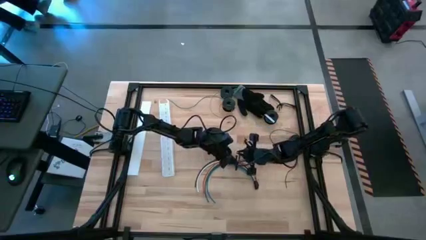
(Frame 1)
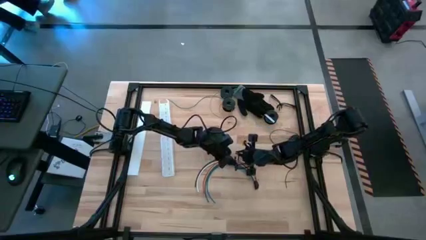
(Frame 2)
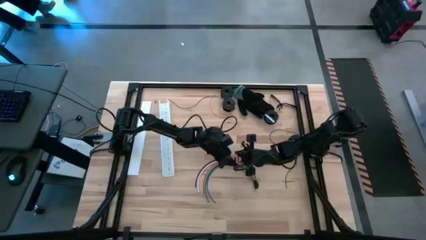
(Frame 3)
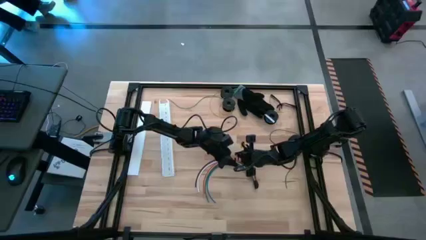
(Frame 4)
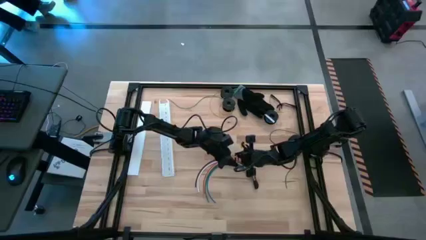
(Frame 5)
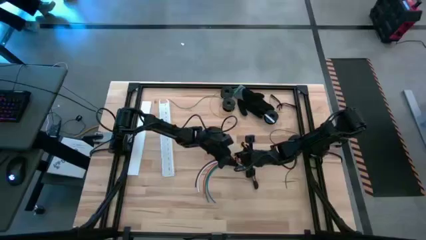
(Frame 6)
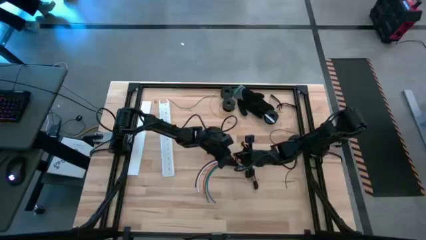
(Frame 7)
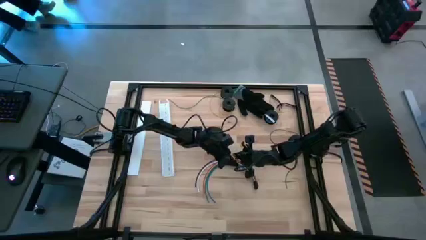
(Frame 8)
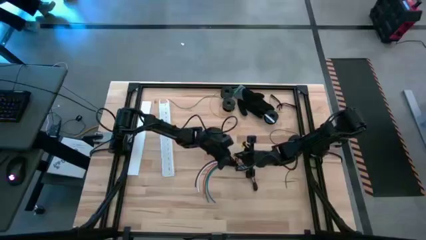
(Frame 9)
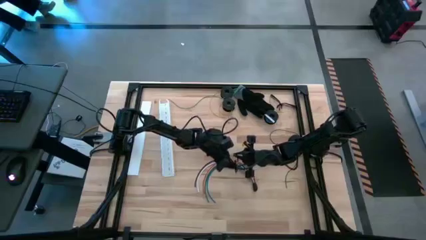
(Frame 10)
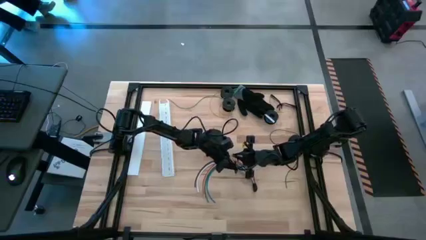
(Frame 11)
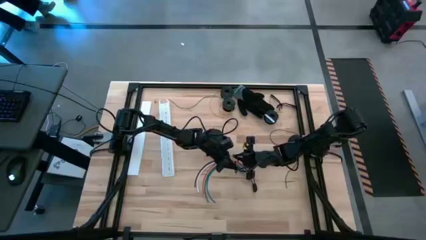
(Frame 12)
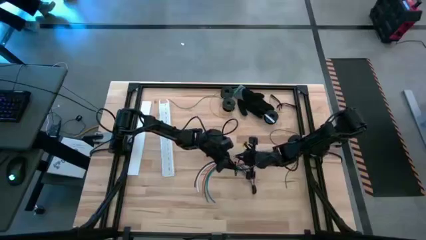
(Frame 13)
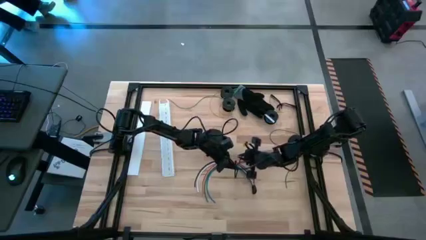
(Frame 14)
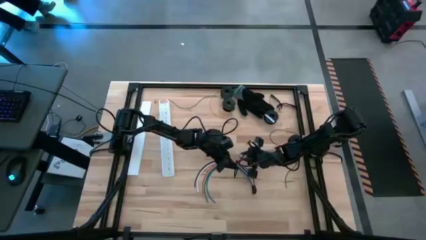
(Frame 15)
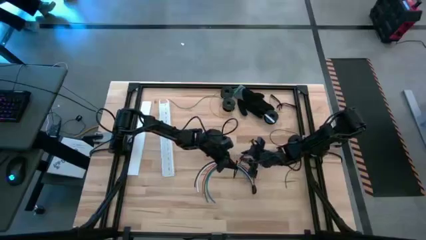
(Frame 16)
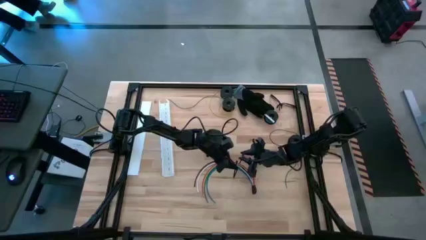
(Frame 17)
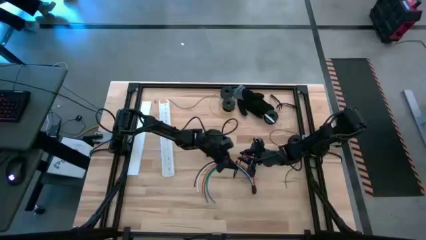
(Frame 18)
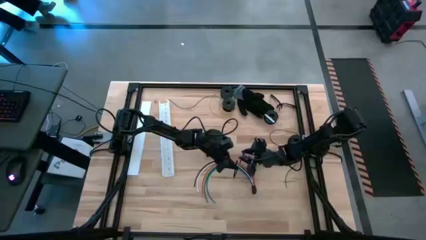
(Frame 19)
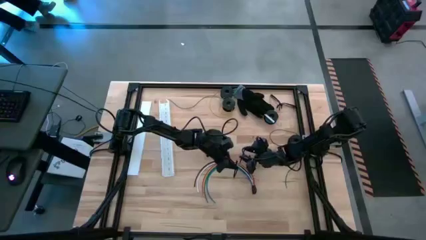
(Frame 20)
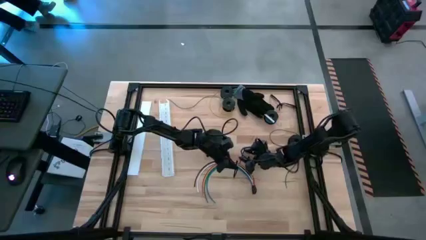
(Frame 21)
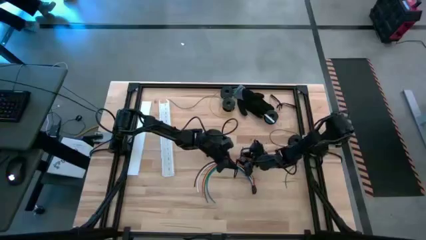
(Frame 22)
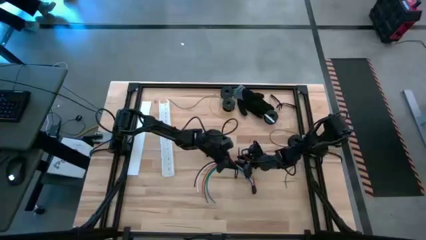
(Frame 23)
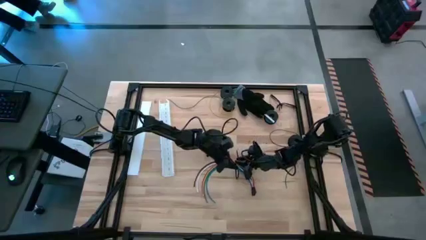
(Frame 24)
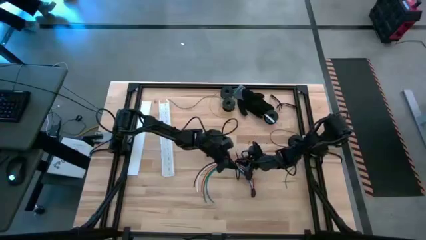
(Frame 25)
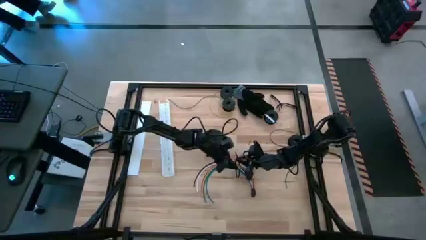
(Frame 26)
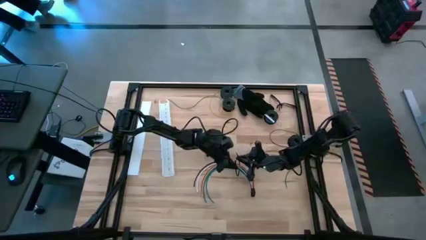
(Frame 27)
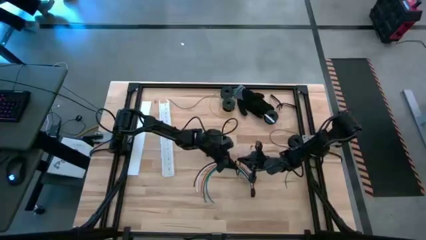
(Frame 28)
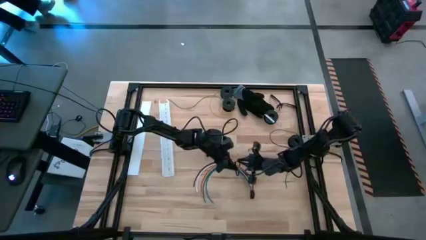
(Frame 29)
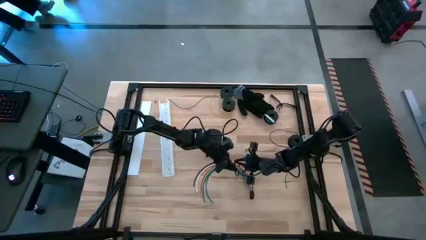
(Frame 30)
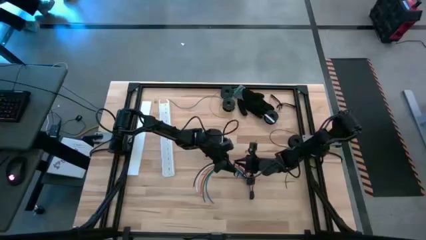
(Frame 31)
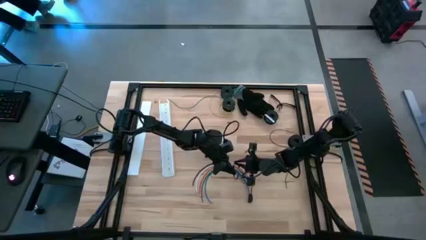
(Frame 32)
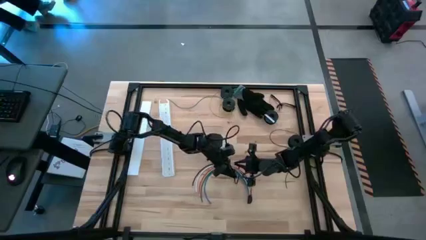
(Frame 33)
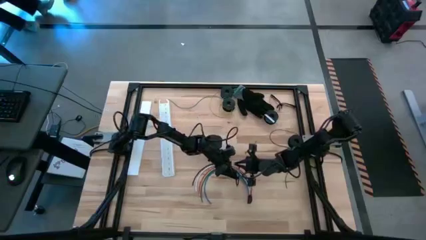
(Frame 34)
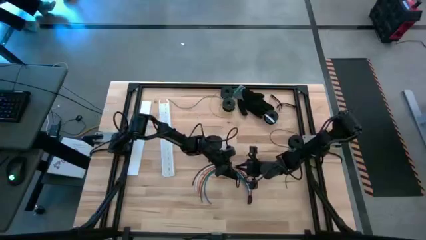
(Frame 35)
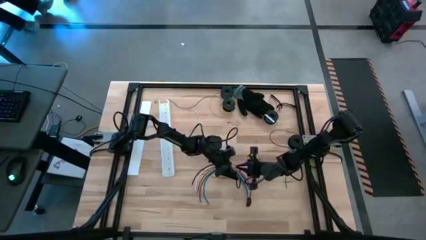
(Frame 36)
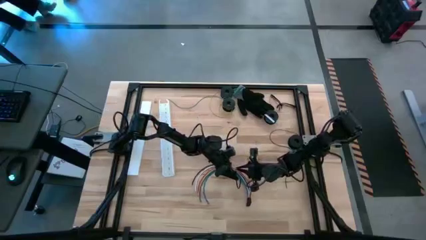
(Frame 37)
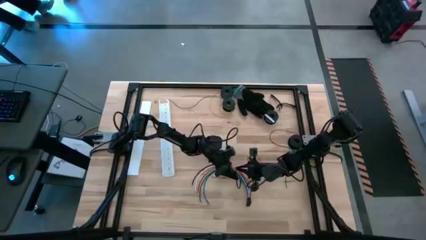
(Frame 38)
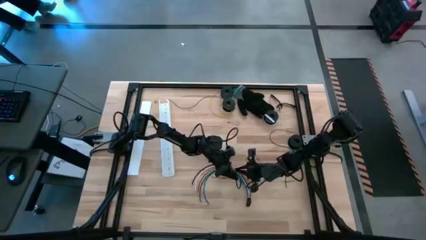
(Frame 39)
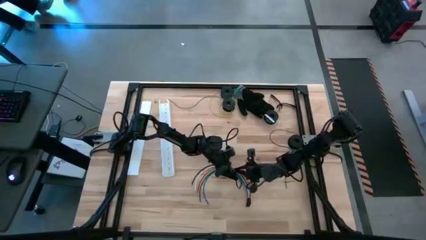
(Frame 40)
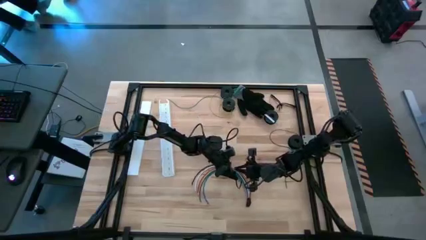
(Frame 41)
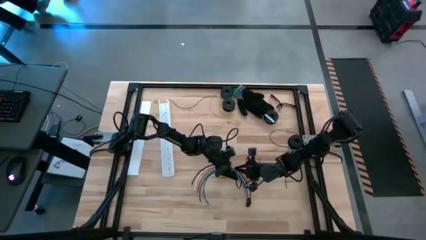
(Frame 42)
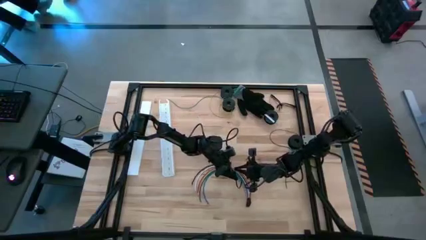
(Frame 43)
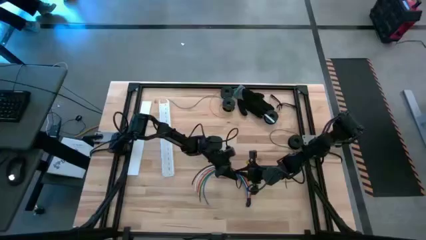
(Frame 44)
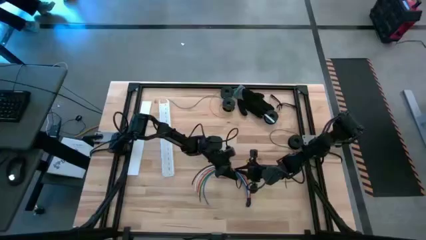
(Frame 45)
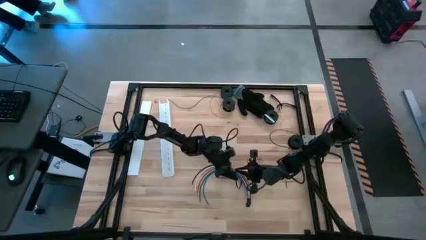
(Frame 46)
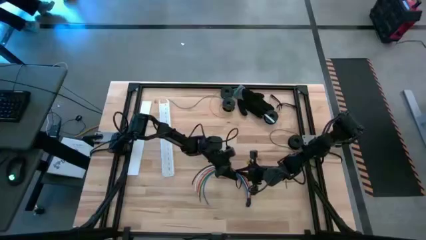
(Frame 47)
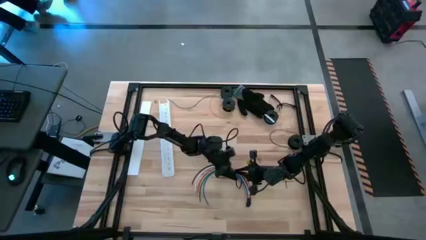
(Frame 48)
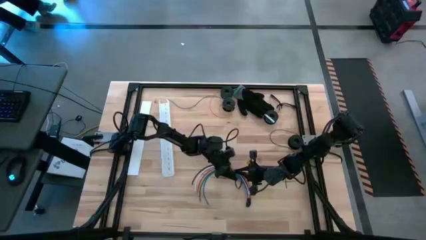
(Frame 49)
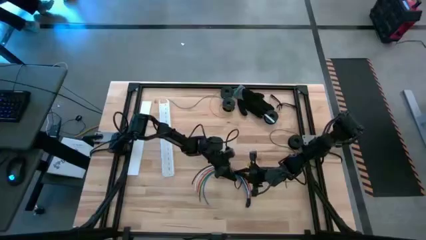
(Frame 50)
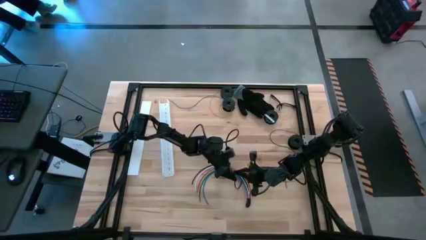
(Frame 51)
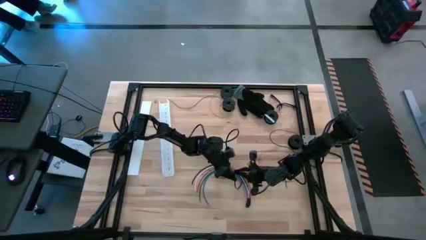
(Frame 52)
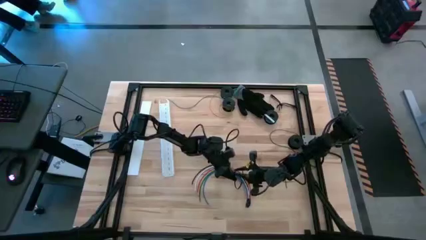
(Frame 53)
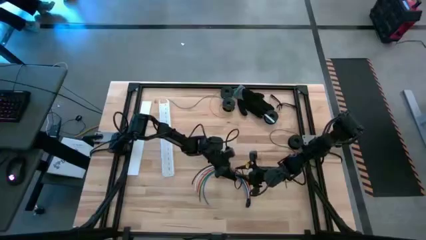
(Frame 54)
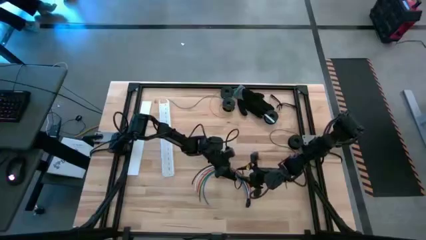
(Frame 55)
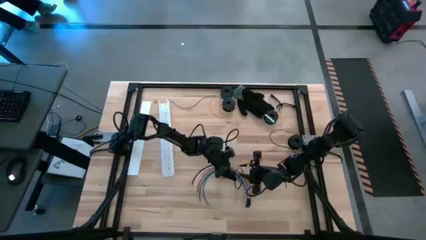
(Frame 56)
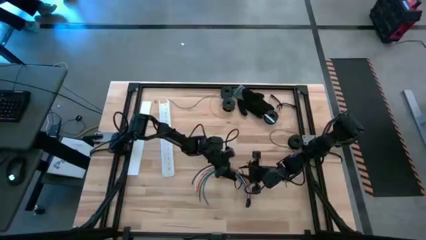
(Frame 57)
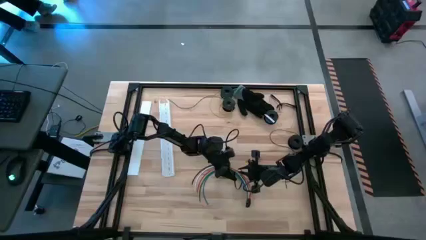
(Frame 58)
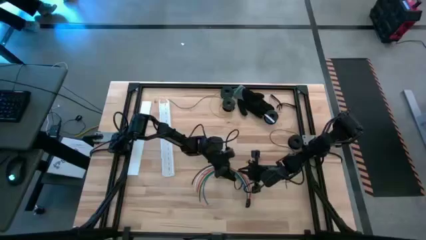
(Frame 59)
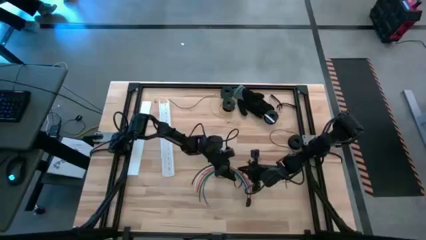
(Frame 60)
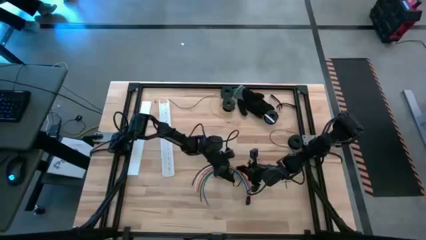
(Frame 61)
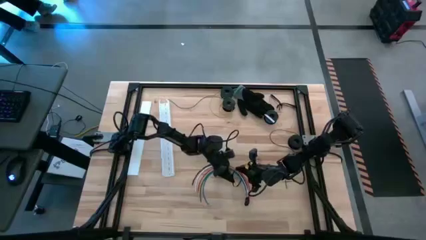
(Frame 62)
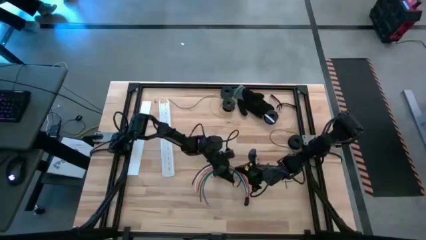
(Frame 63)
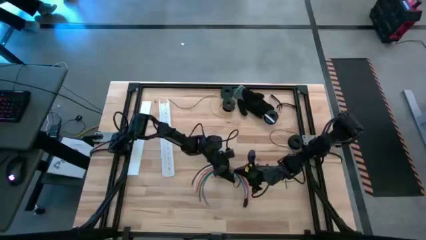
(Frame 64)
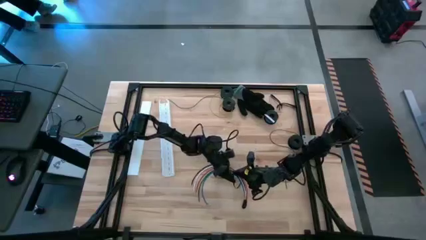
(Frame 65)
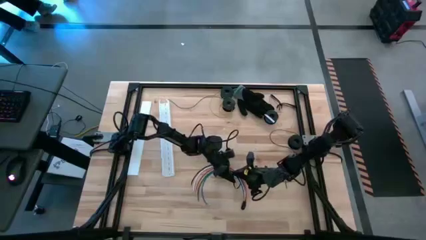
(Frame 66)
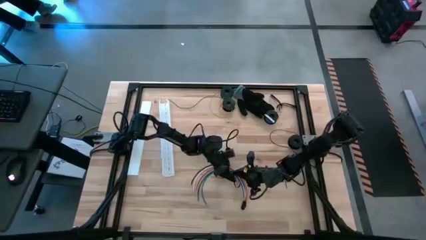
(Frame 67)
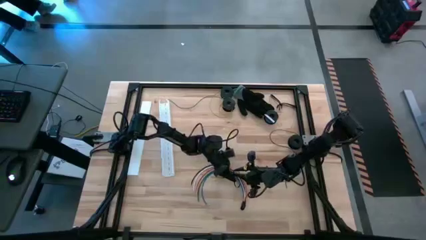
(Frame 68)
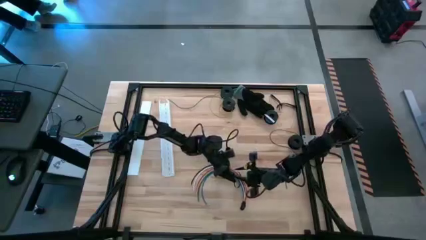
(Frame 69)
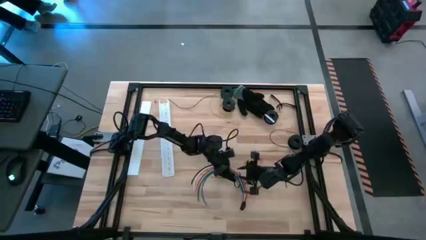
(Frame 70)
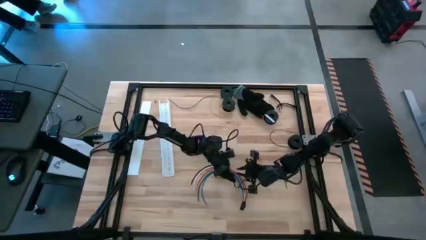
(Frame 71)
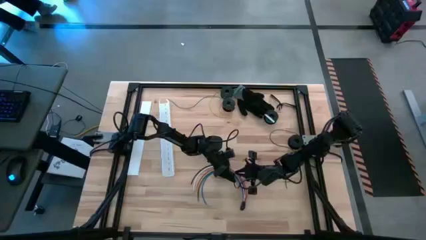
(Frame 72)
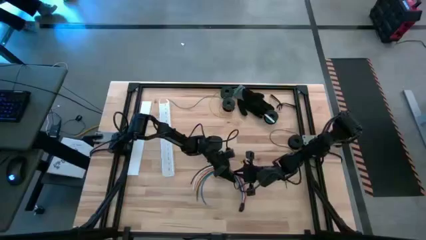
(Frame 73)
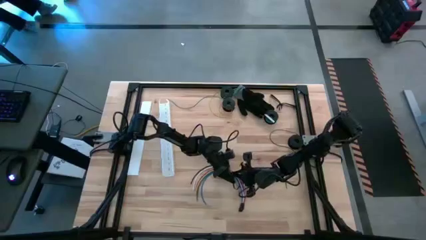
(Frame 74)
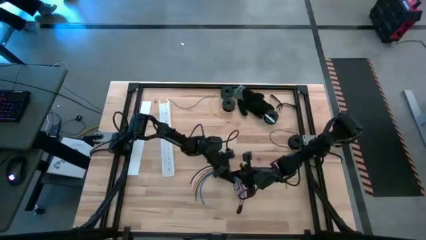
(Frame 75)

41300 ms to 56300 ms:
Task: Ziptie cables
Wrap the cables together using a black zip tie

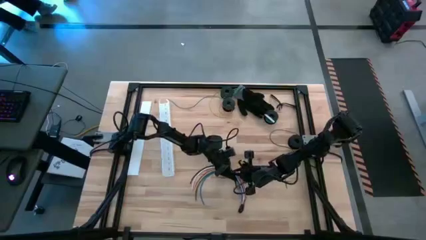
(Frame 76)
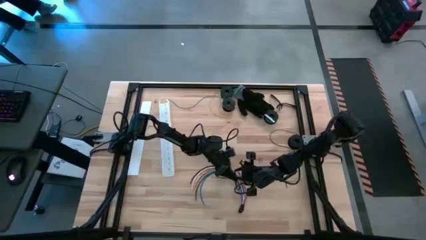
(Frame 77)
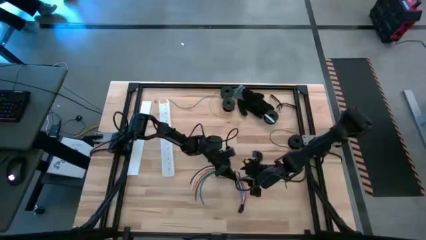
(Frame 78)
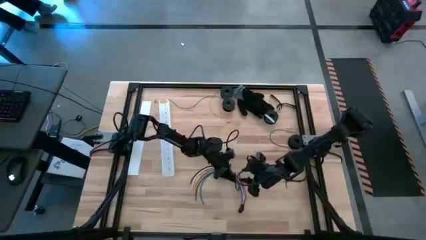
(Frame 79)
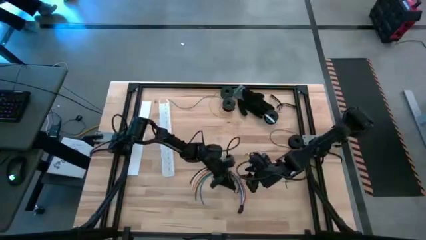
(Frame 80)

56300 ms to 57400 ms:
Wrap the cables together using a black zip tie

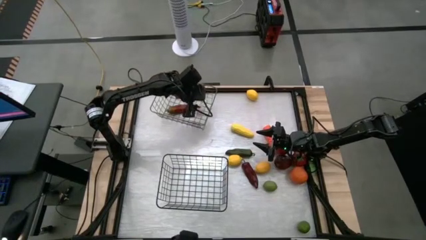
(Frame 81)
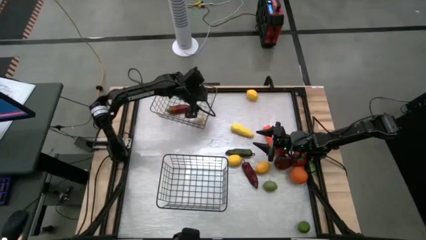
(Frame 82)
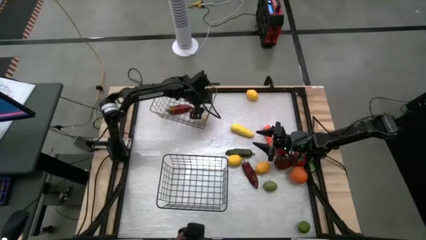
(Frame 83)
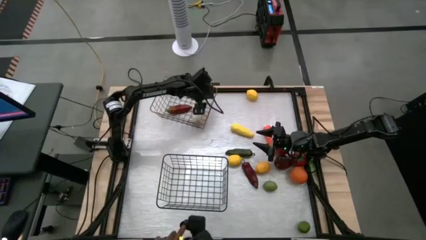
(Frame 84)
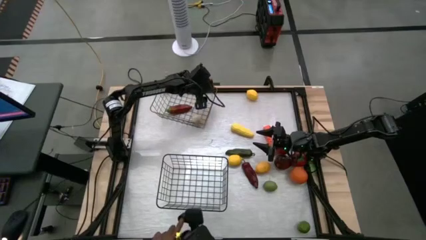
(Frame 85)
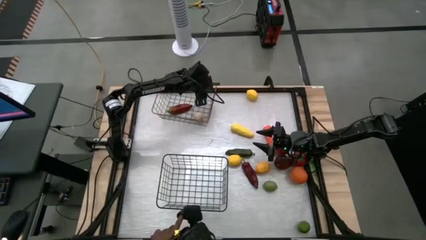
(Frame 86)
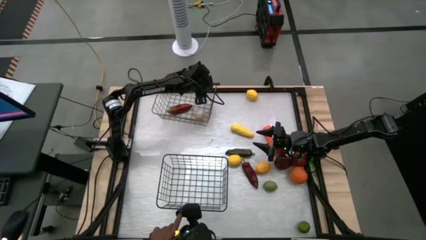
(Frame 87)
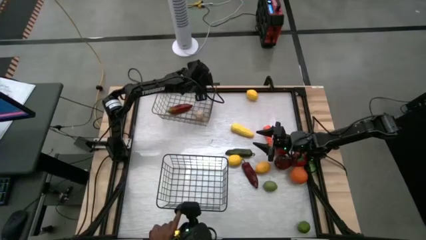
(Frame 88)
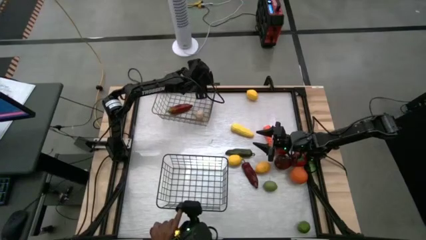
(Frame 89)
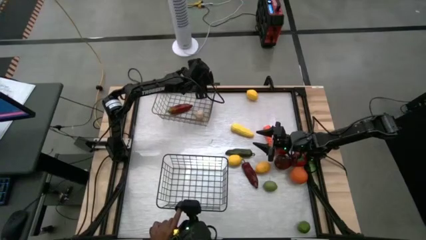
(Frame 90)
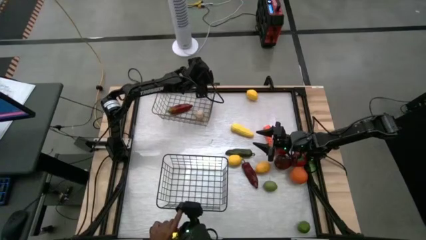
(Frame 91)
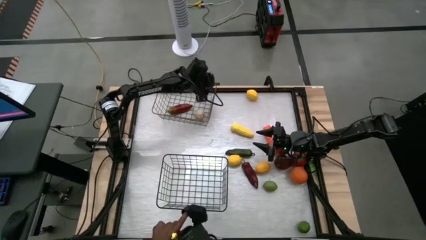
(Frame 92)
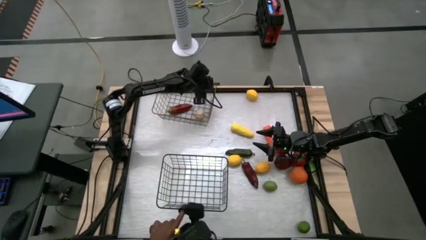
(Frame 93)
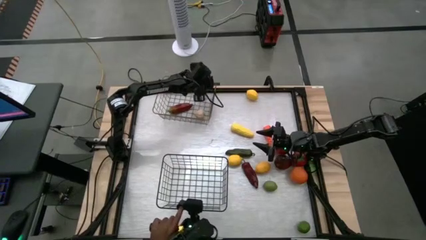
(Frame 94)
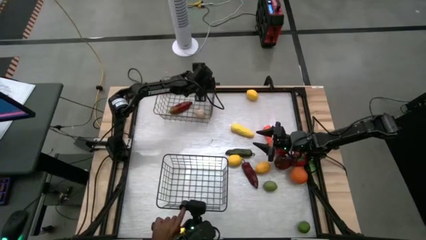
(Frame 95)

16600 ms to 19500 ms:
Task: Sort produce into baskets
Adjust the top wire basket
